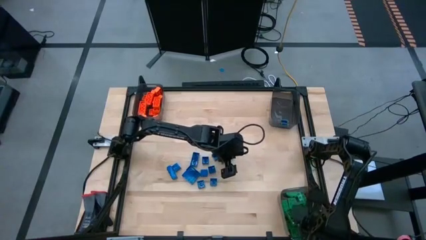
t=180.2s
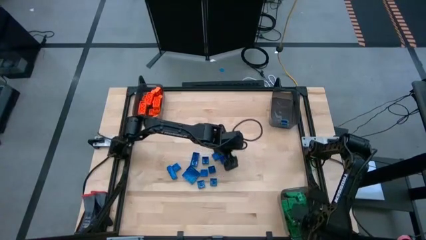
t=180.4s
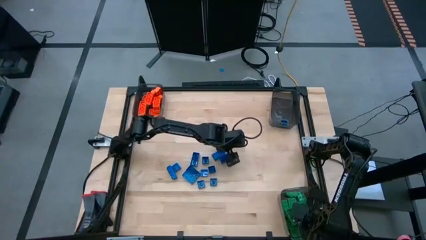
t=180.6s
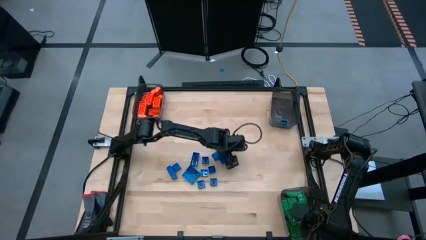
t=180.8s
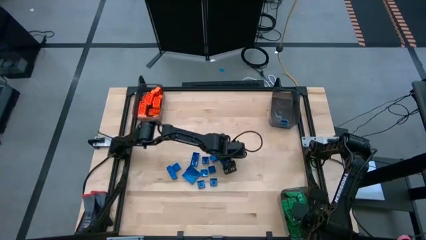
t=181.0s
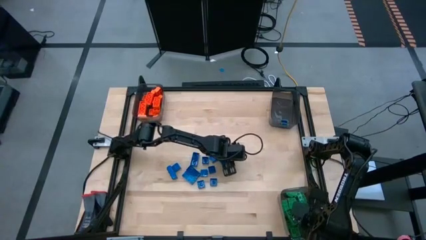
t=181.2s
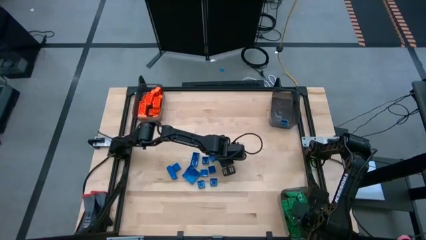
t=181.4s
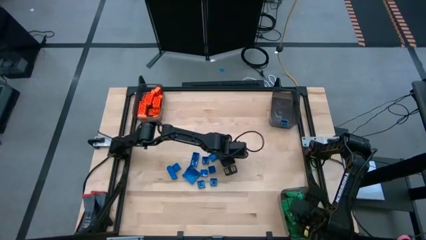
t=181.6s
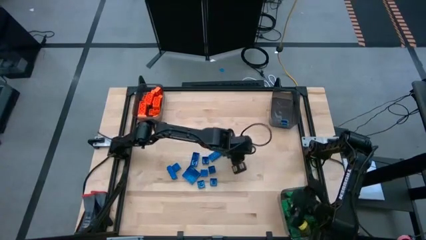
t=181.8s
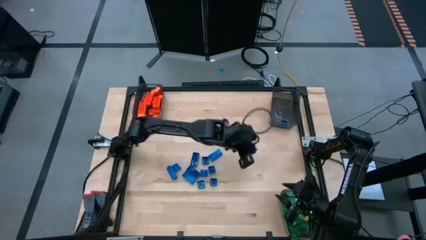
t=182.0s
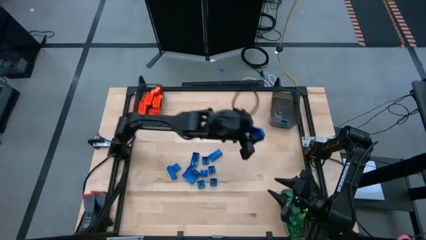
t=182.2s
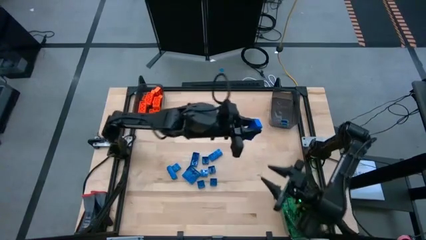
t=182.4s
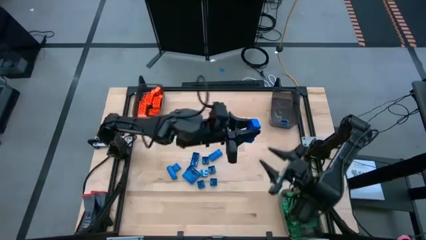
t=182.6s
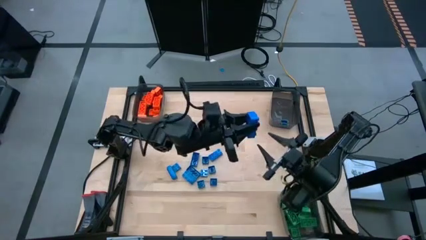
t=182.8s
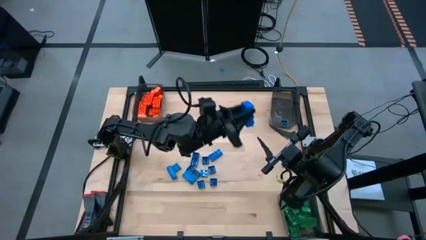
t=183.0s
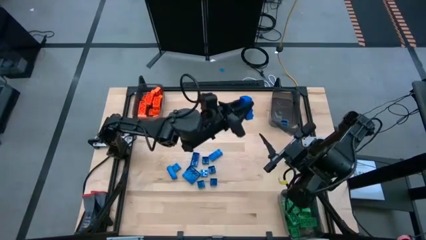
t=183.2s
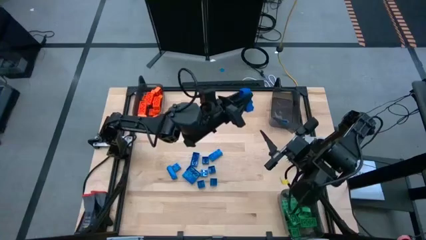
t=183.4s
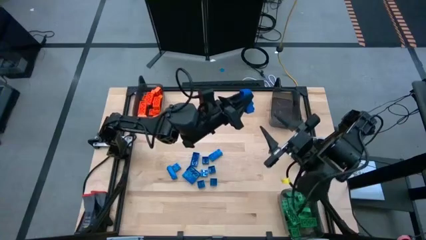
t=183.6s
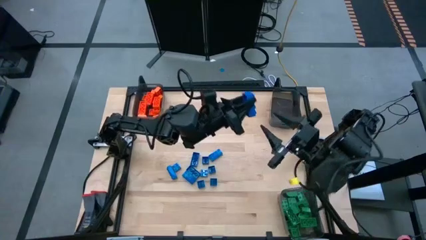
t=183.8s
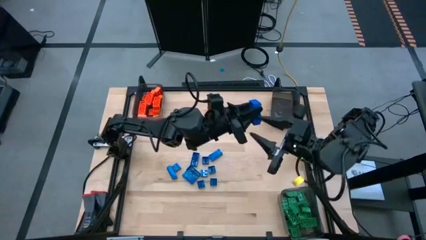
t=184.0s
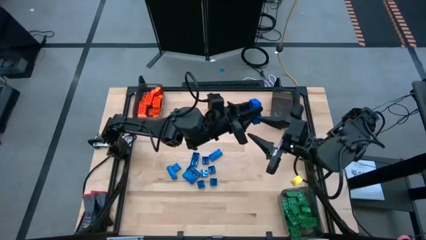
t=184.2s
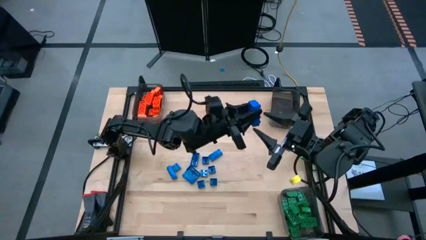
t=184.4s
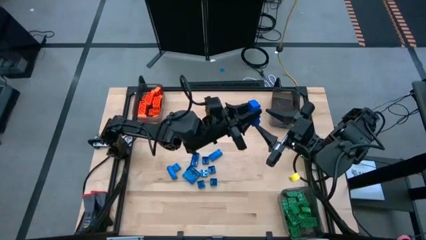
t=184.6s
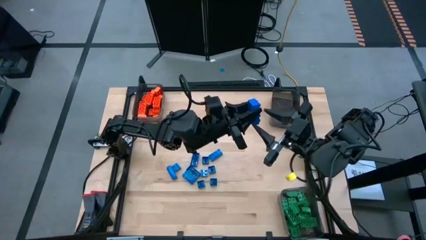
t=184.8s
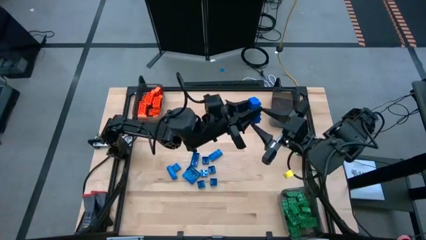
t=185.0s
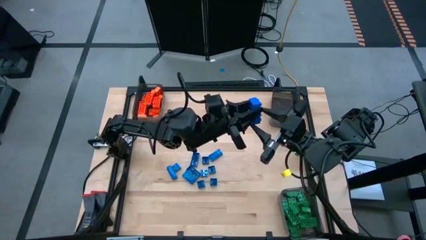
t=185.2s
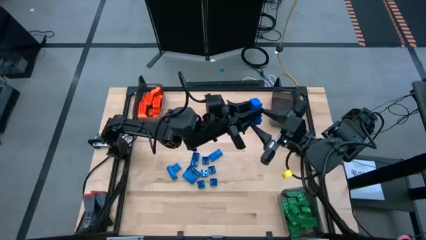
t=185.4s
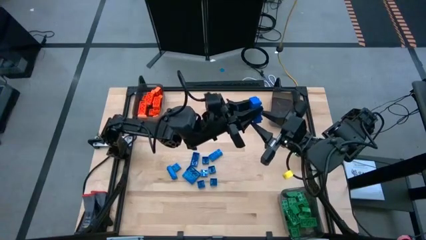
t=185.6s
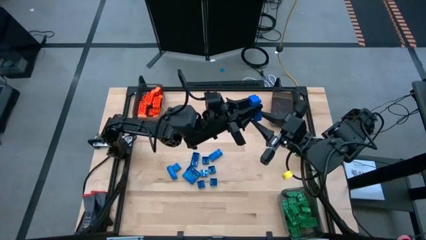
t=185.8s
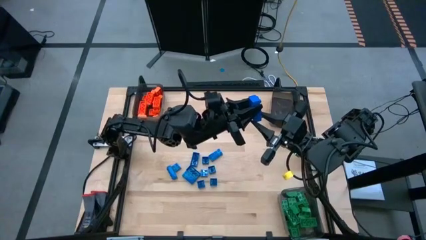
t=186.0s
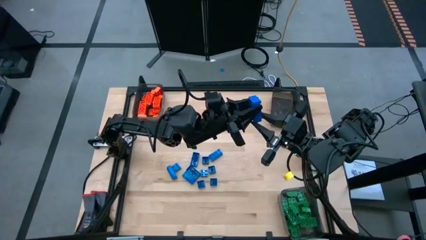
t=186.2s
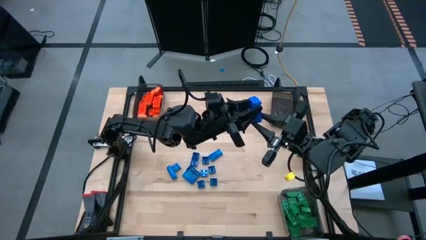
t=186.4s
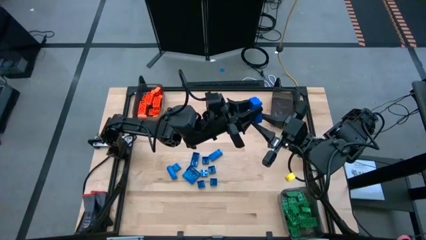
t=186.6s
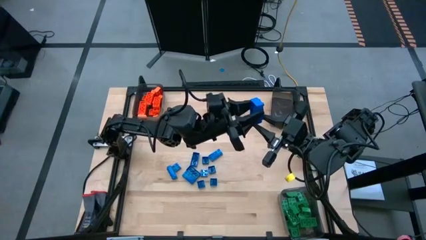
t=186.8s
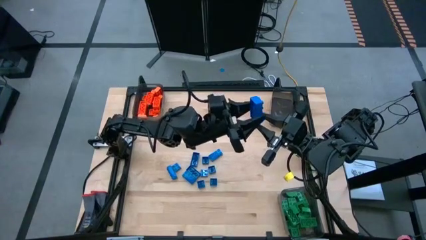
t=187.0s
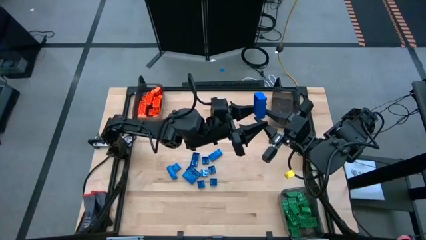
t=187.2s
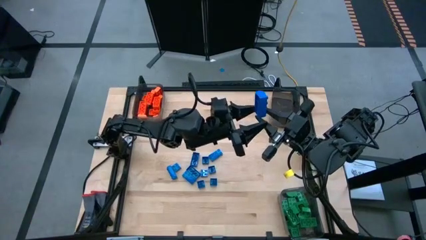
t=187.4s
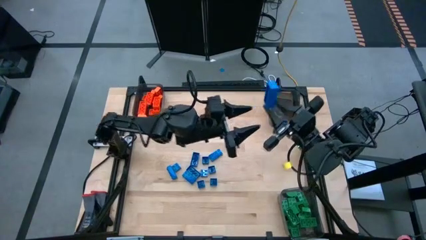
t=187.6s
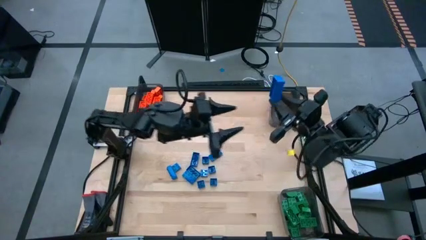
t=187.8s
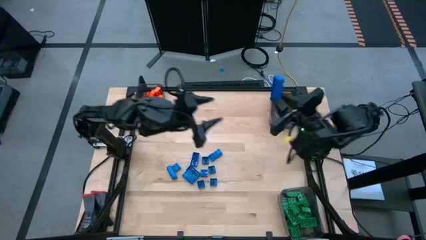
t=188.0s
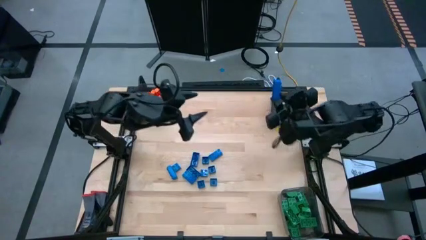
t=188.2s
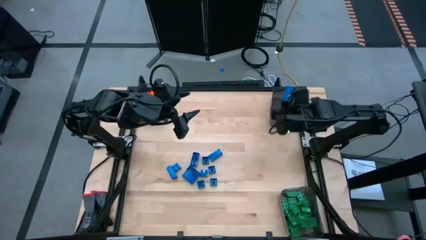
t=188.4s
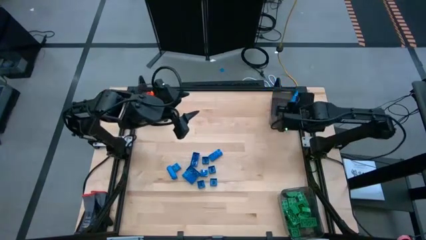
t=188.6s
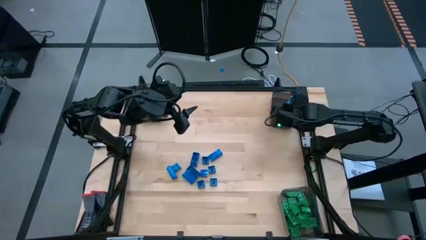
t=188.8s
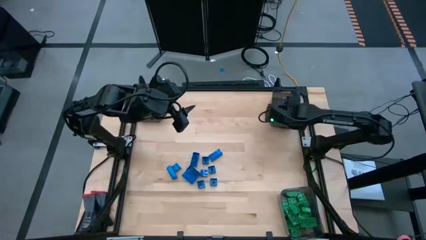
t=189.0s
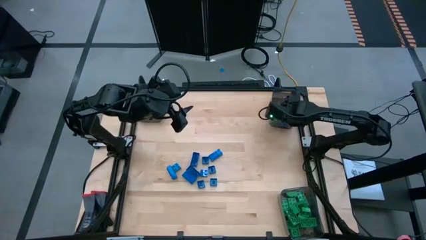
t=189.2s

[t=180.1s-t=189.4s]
Task: Sort blocks
Put the blue game piece into the top right black bin

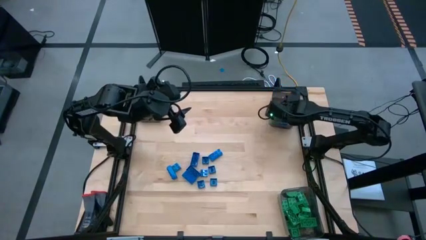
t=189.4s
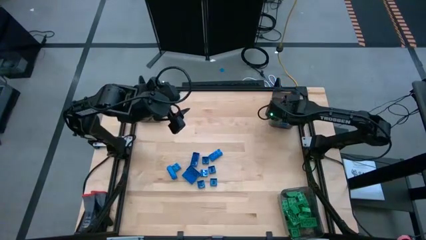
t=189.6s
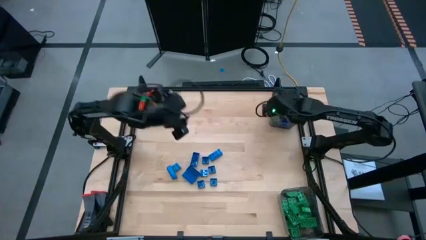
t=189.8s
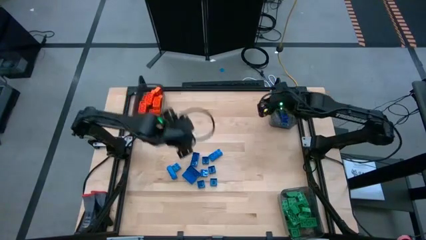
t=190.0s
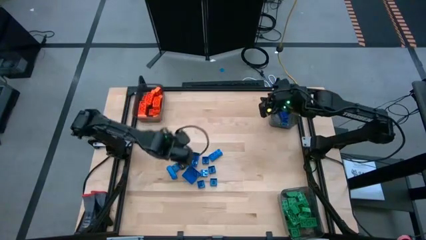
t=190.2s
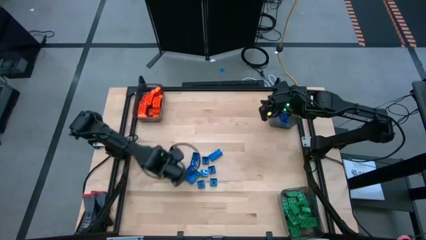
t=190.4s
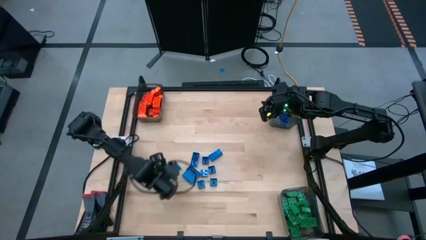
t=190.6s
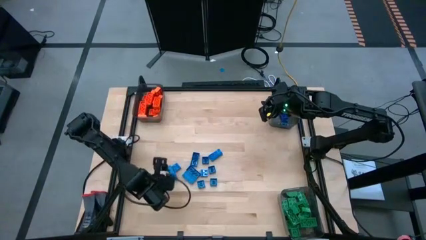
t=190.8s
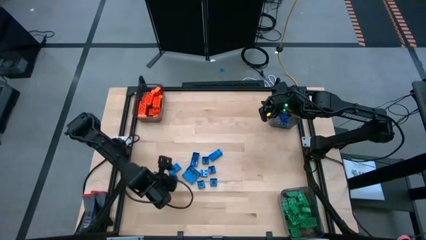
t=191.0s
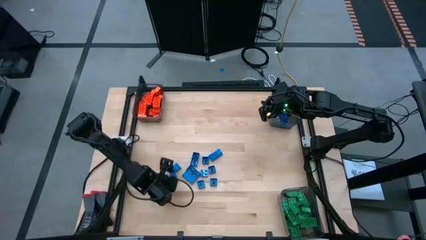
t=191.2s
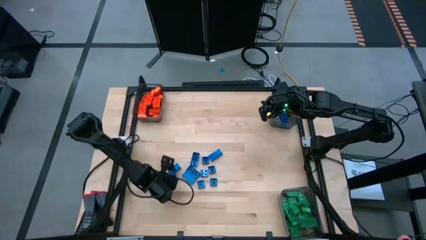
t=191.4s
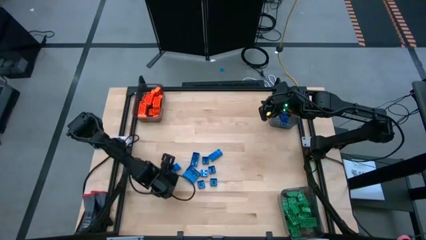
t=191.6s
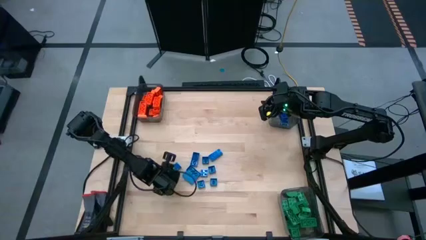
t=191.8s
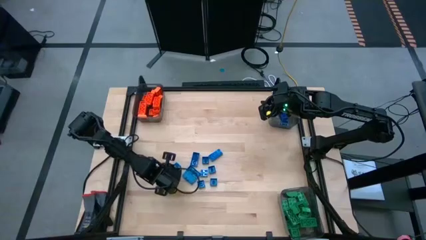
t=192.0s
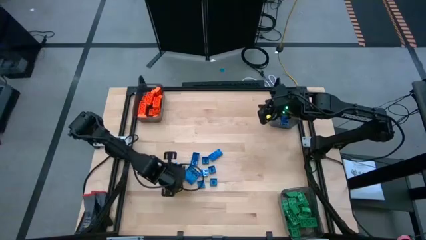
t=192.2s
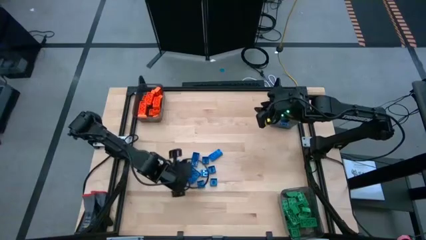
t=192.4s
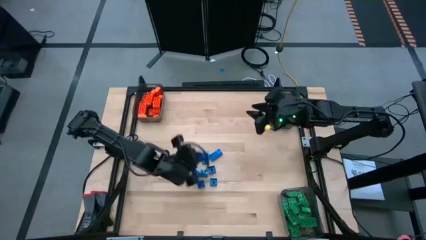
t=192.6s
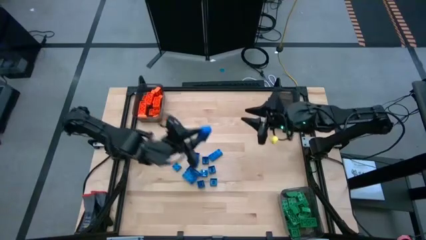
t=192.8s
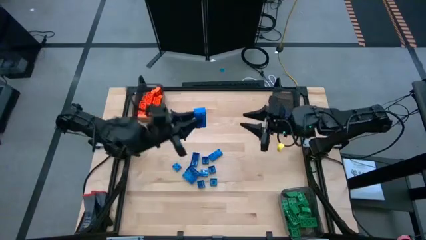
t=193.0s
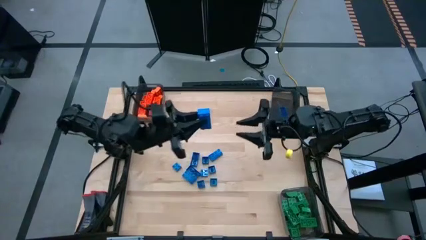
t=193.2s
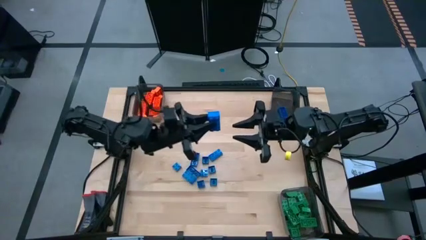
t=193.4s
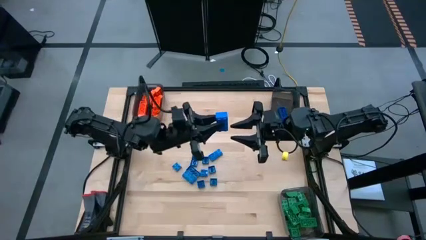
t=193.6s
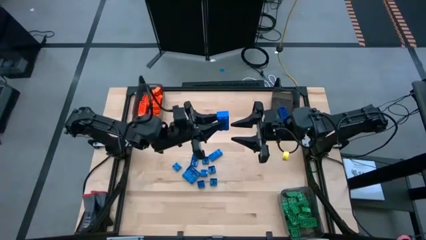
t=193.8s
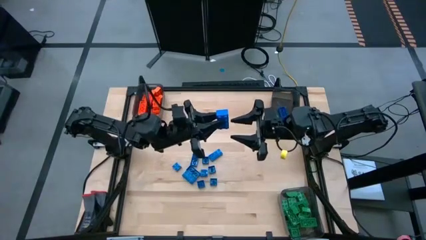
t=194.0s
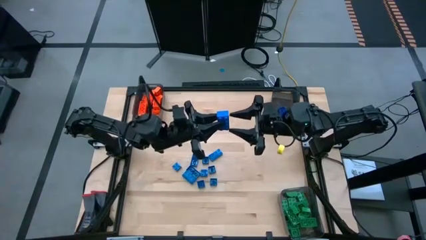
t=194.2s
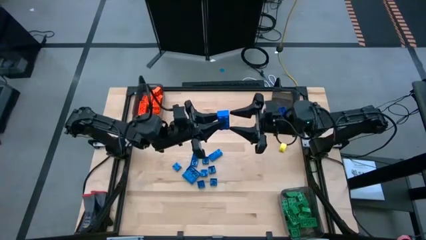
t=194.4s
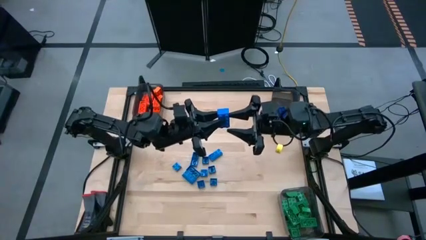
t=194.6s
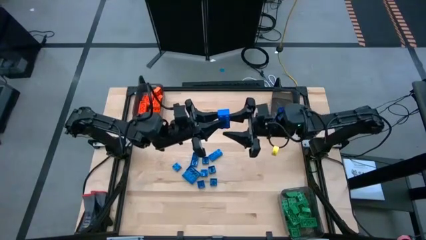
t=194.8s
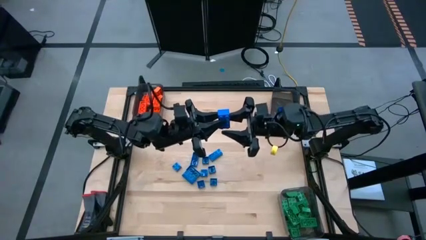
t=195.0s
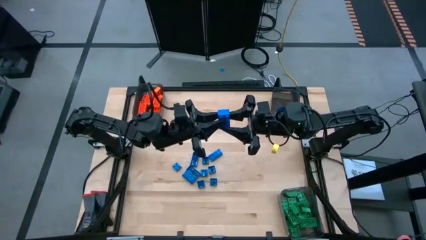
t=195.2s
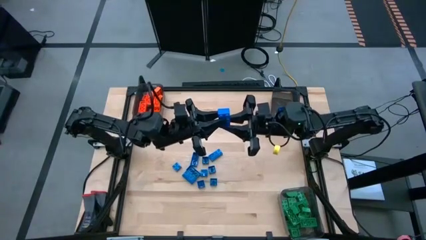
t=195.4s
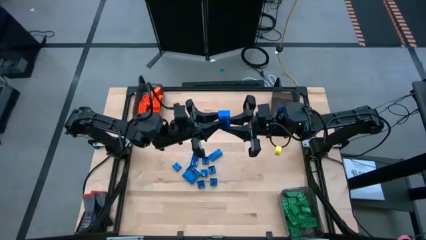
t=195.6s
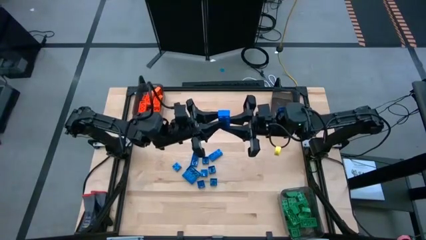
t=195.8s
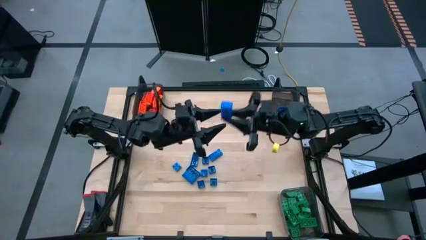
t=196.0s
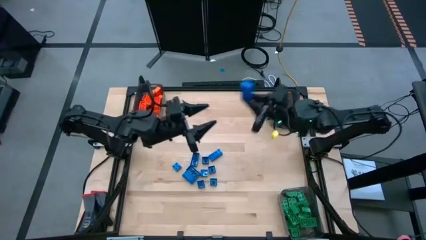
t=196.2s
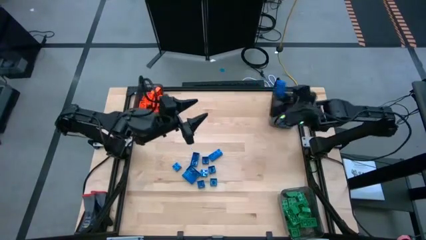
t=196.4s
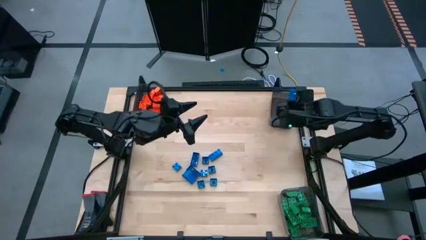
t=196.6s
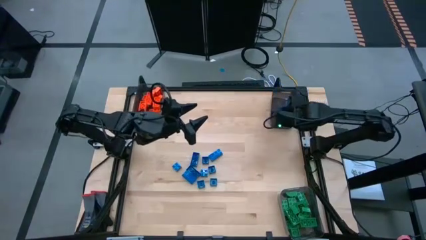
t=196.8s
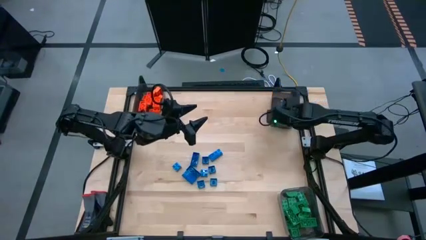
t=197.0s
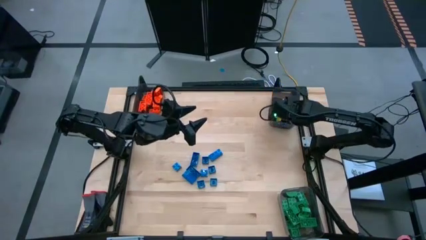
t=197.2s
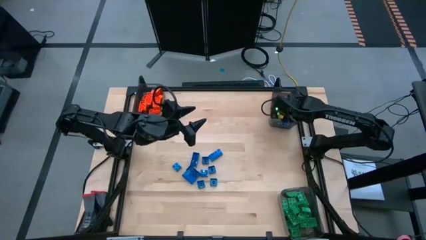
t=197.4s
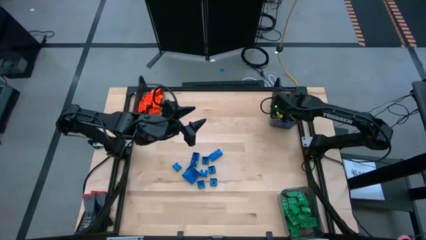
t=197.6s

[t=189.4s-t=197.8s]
Put the blue game piece into the top right black bin

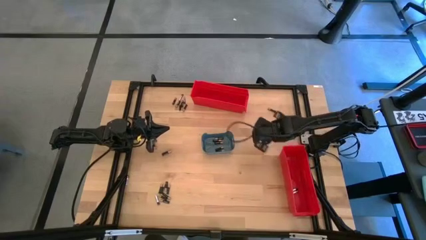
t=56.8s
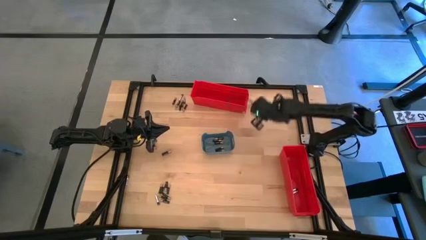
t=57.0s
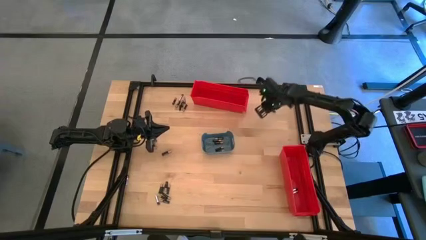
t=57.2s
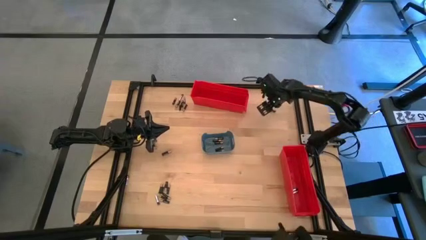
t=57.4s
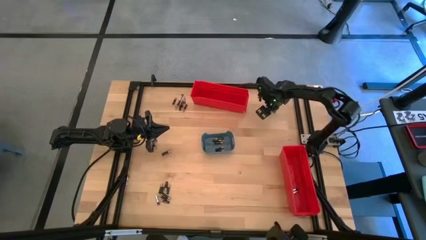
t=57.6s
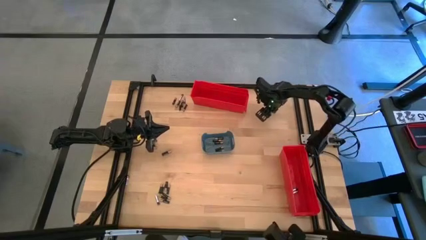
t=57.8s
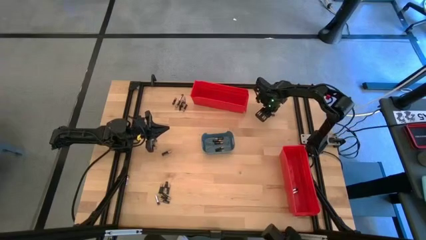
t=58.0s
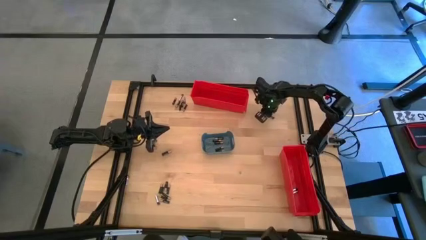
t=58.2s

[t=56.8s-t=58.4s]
Task: Sort batteries
Put the black battery into the blue bin
